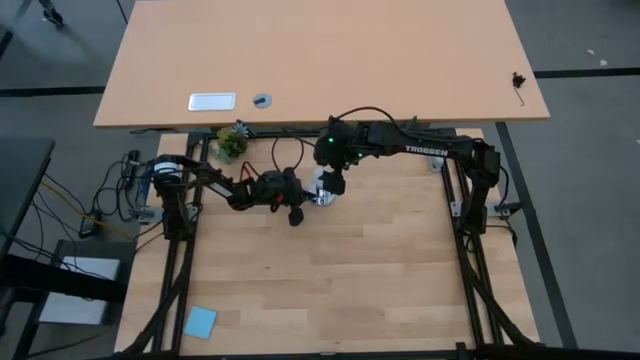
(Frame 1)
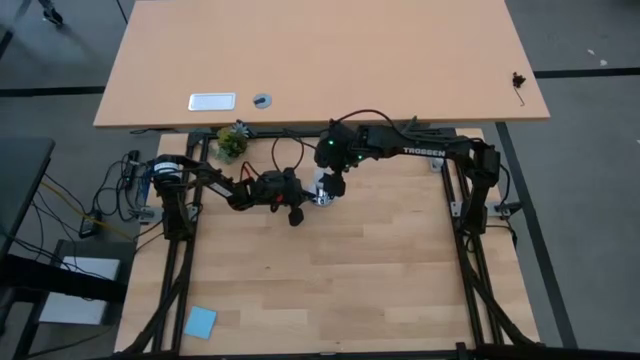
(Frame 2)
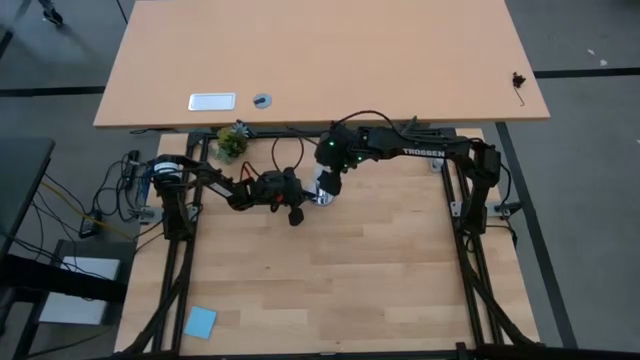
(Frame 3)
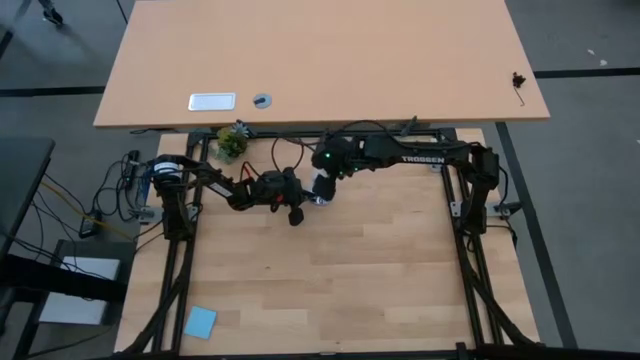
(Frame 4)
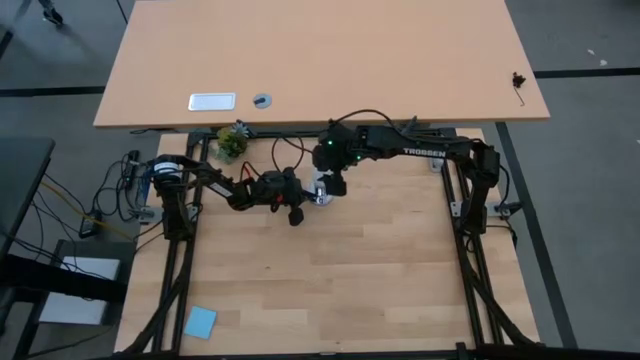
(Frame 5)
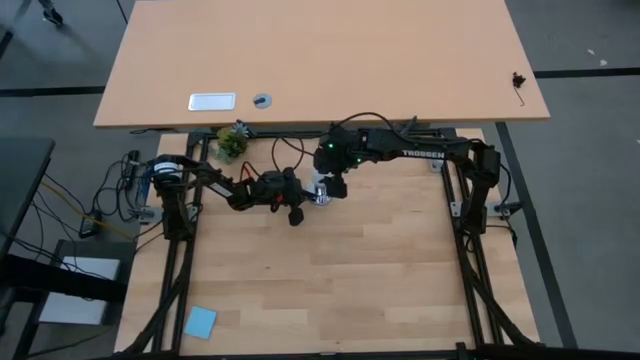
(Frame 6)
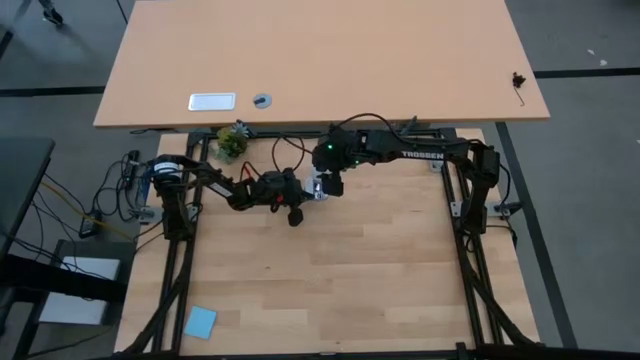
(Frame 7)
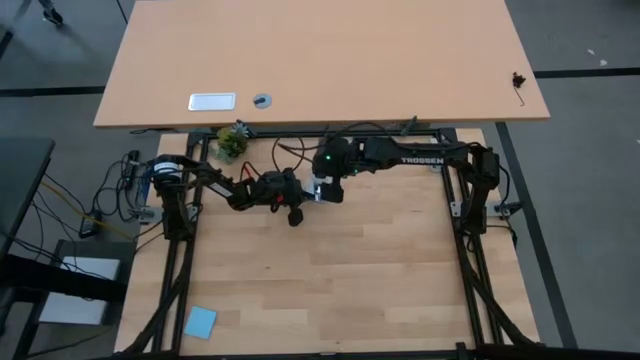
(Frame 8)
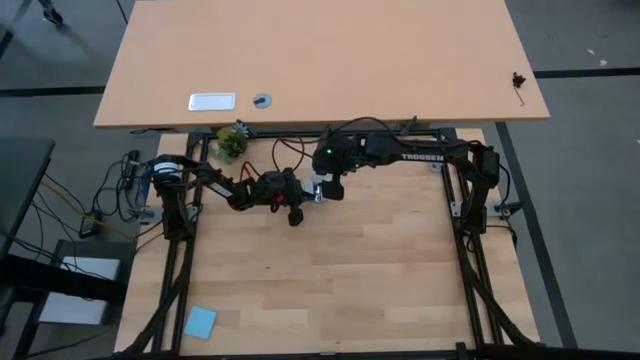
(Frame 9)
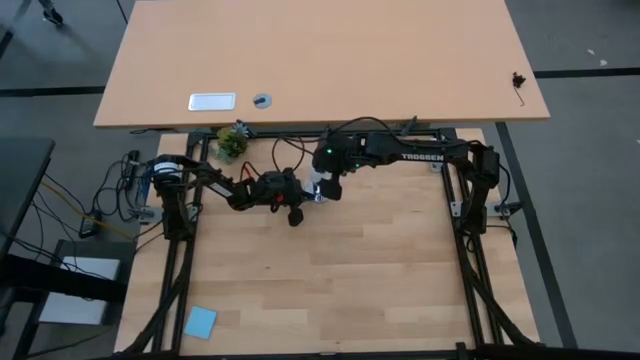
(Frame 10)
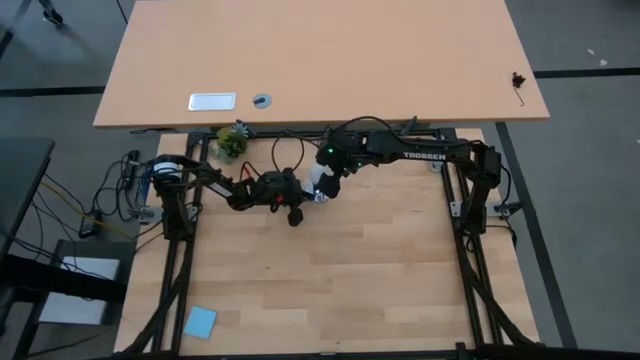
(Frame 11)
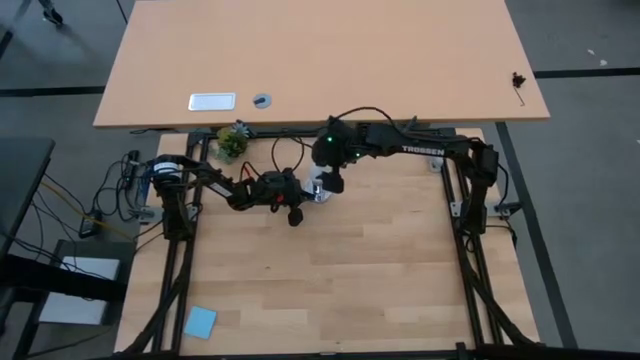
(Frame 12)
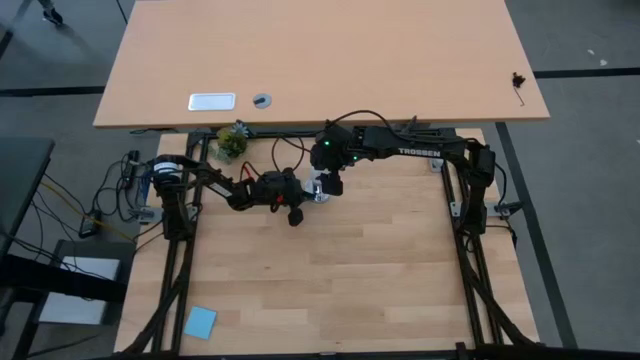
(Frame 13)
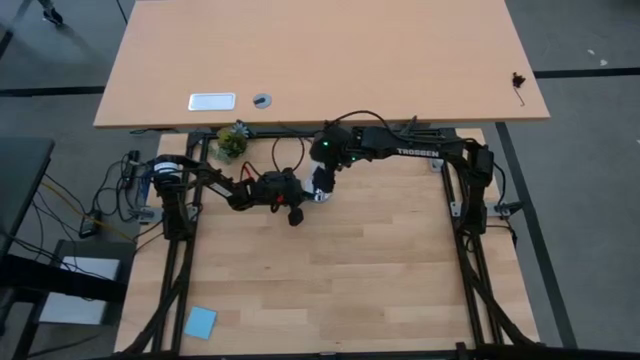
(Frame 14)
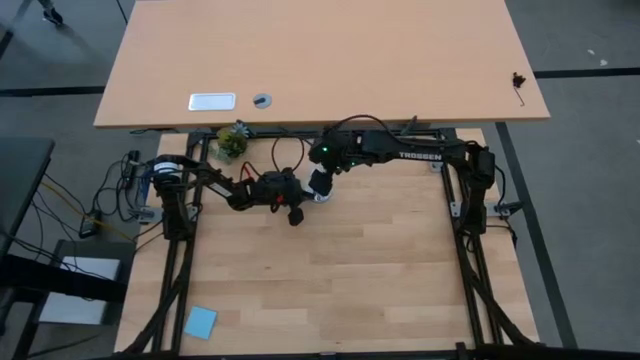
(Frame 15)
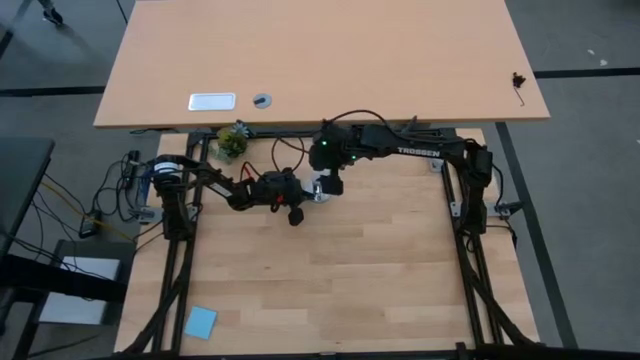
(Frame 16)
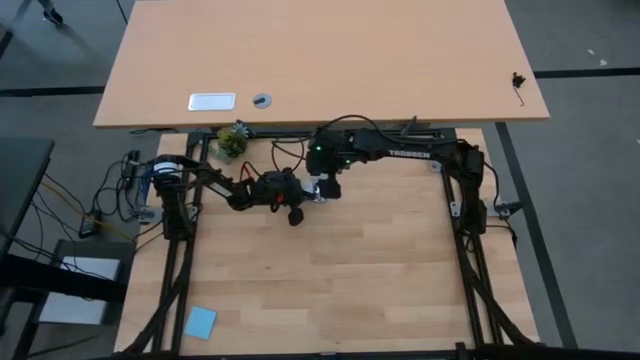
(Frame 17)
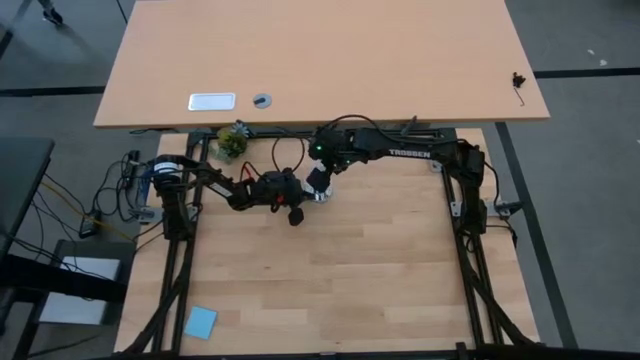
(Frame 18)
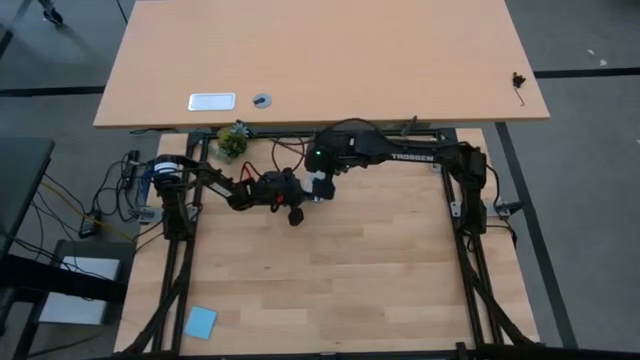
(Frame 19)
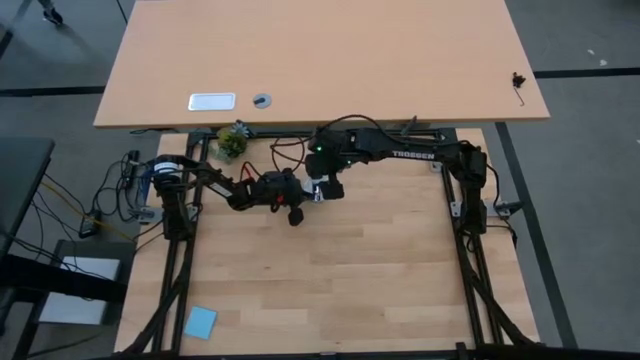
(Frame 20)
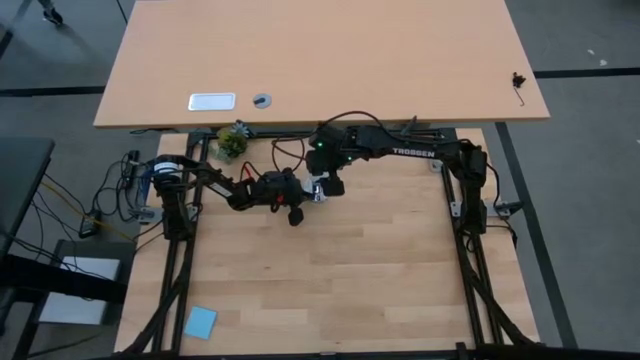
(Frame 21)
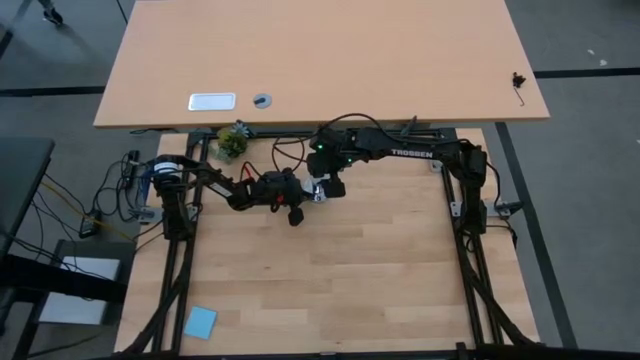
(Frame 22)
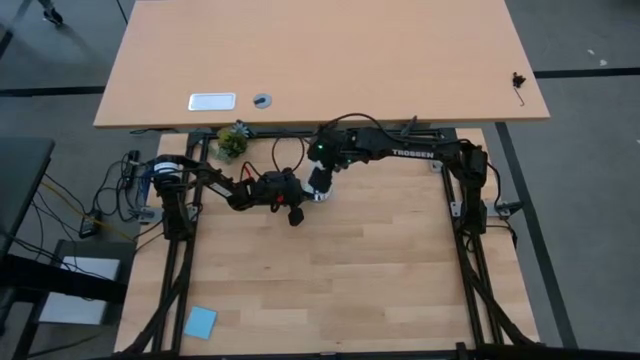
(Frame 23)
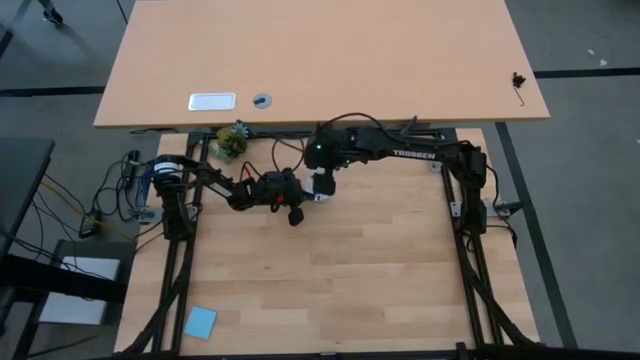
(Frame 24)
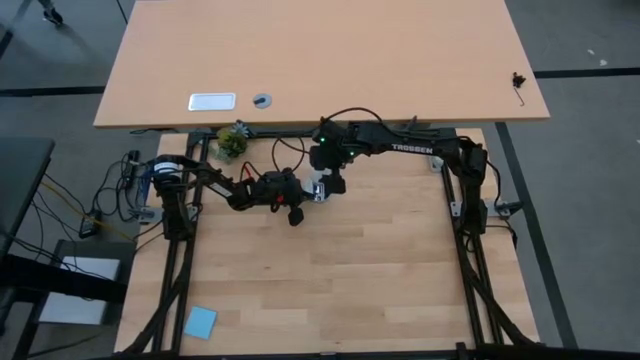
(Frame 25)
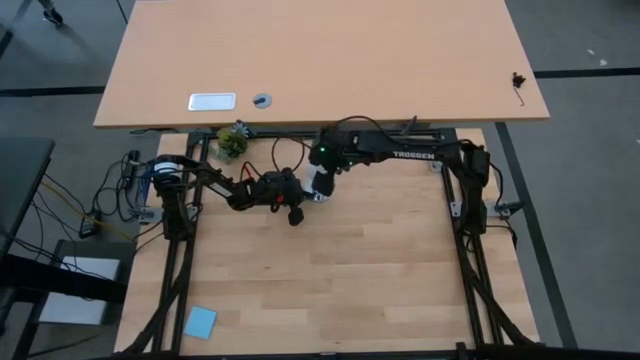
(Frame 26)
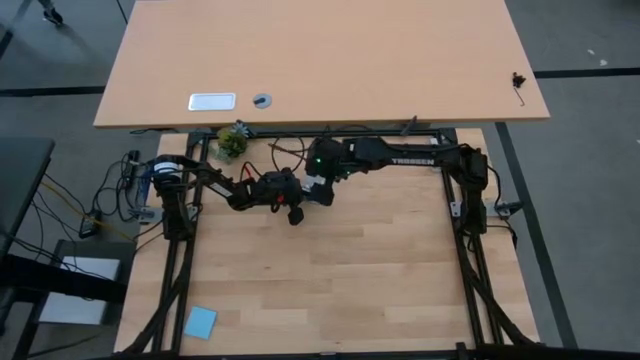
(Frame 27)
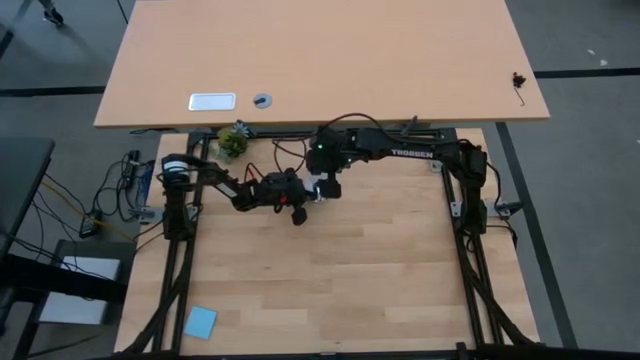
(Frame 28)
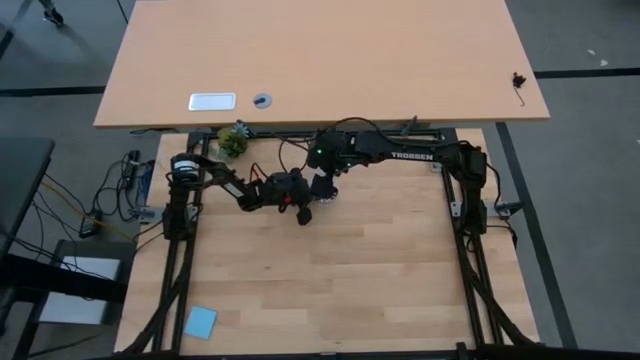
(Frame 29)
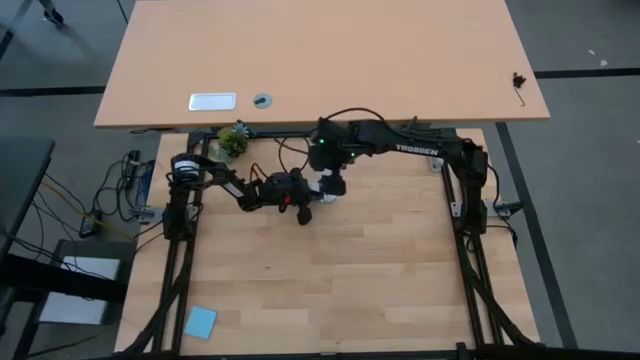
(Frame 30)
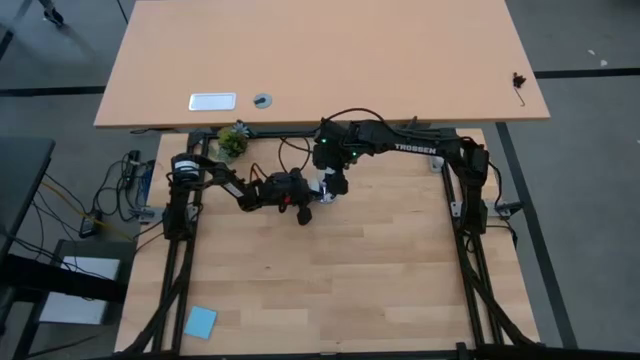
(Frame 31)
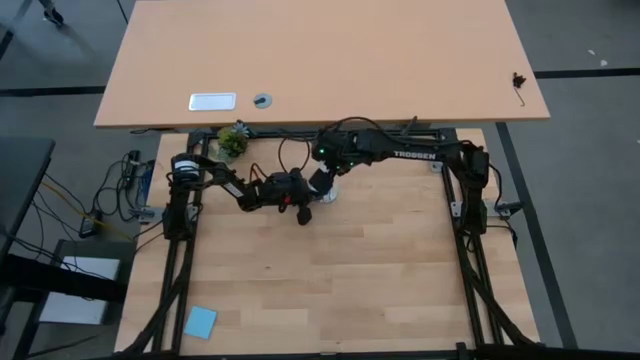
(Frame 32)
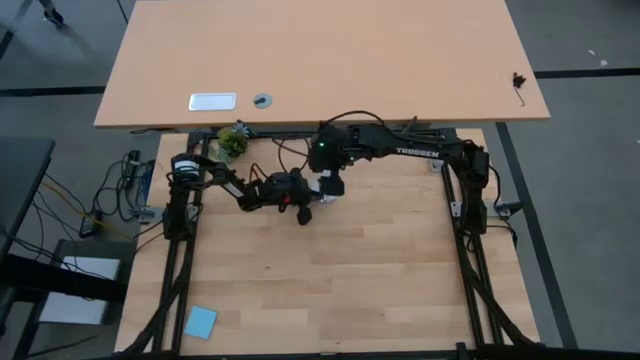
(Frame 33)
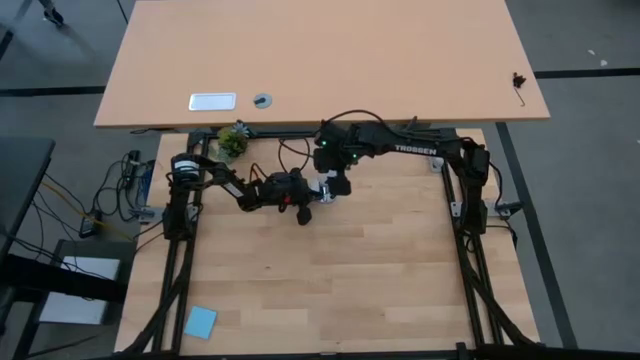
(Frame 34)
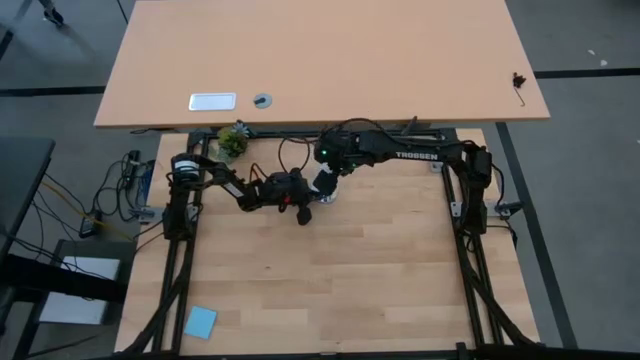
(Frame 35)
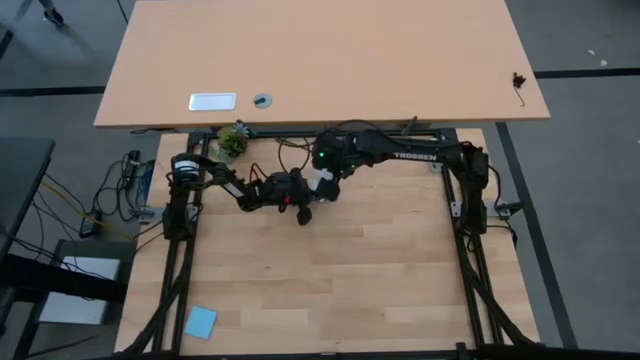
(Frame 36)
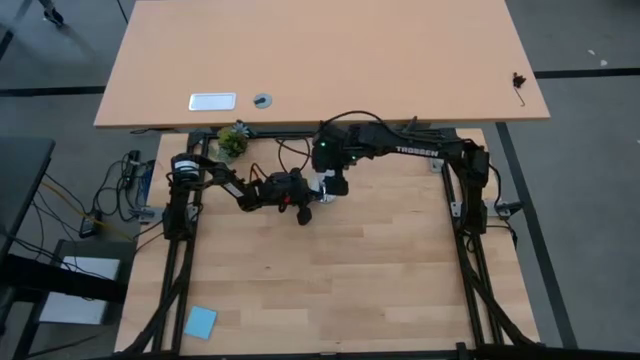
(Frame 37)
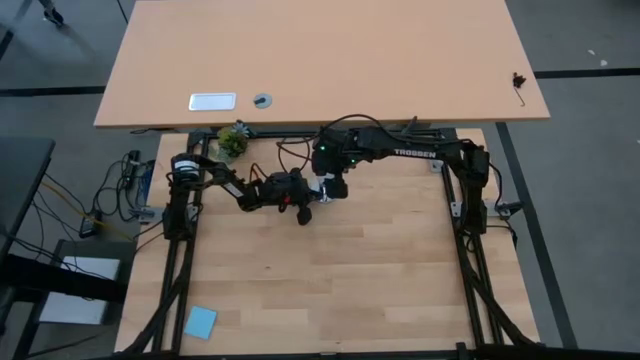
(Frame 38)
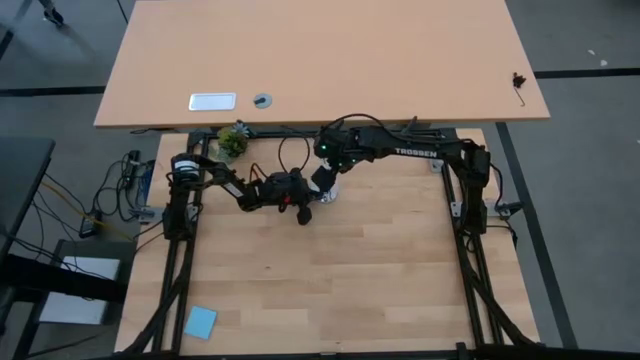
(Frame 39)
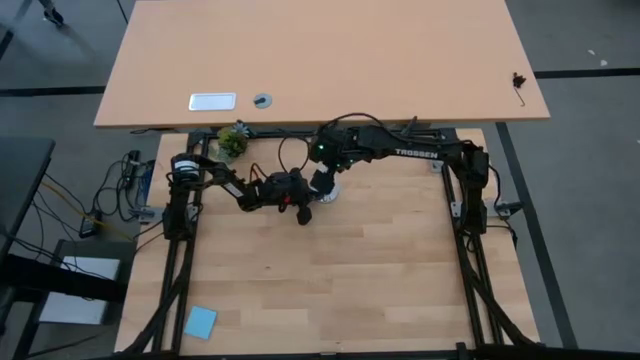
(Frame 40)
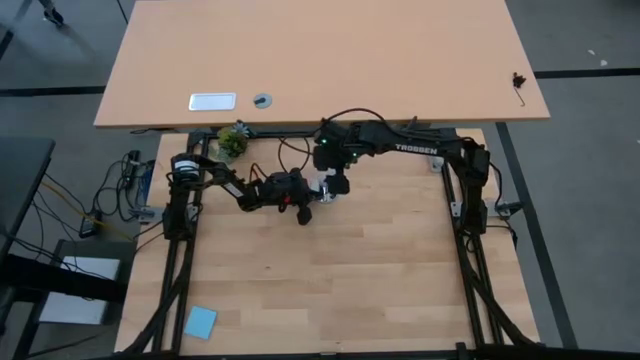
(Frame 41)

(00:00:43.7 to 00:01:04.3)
Task: Screw lightbulb
Insert the lightbulb into the lamp
